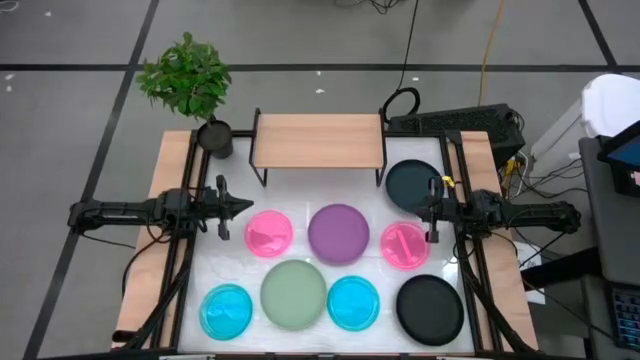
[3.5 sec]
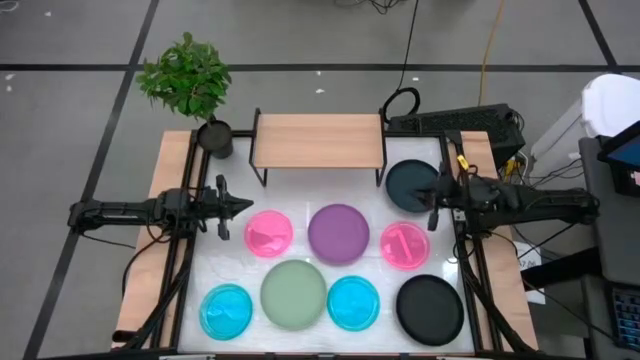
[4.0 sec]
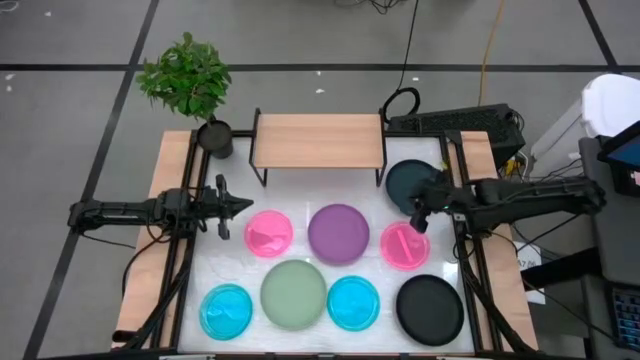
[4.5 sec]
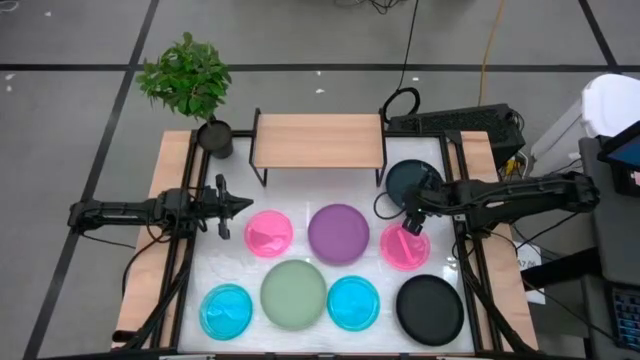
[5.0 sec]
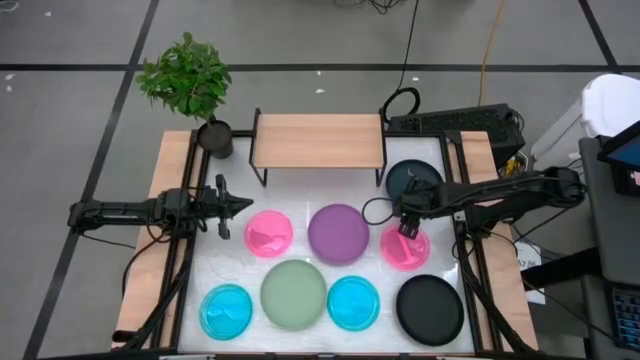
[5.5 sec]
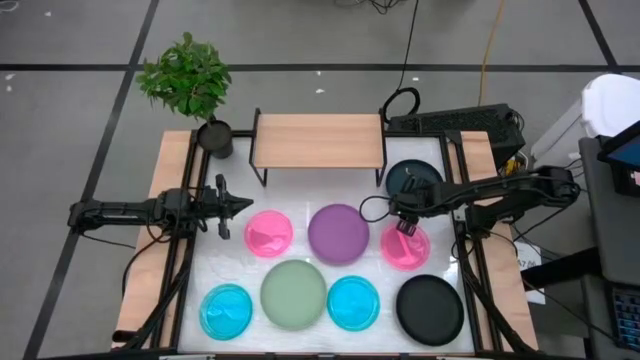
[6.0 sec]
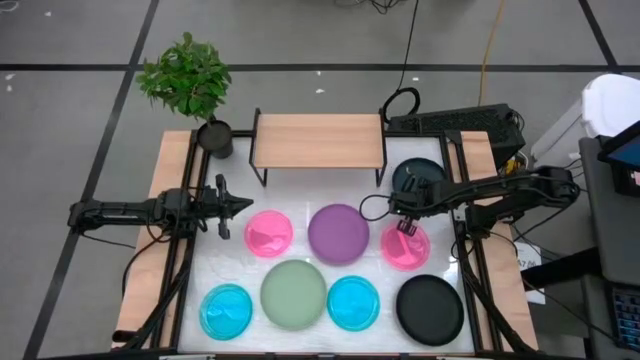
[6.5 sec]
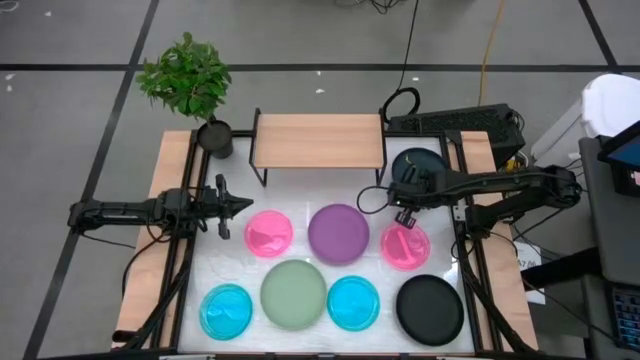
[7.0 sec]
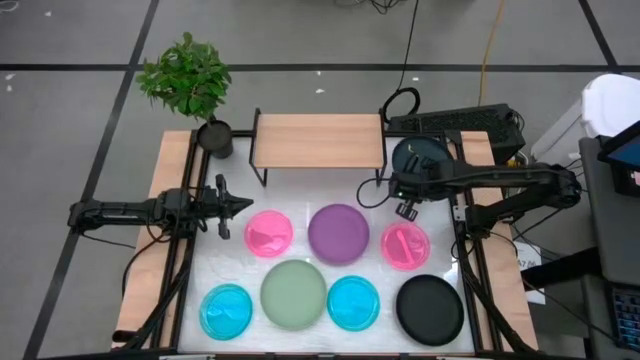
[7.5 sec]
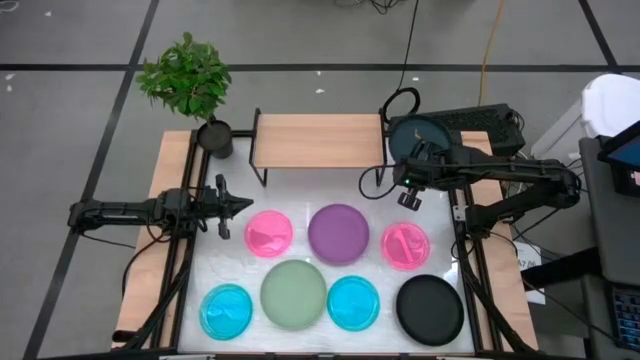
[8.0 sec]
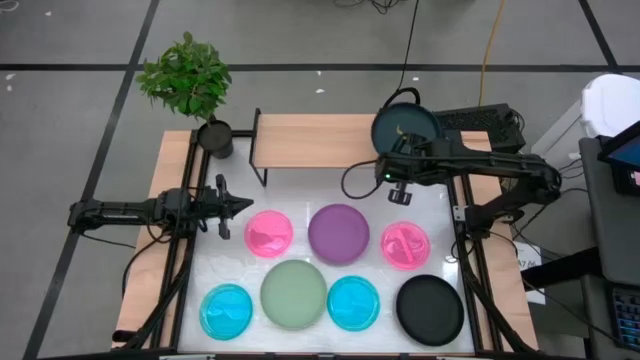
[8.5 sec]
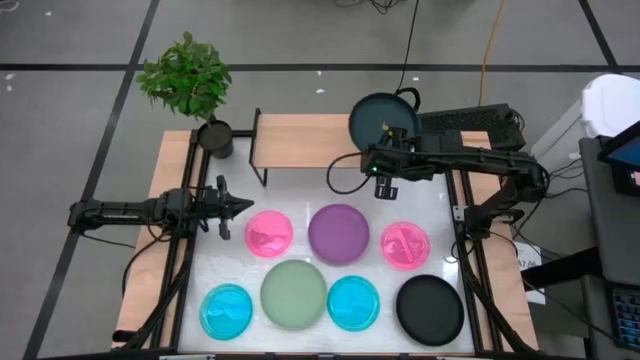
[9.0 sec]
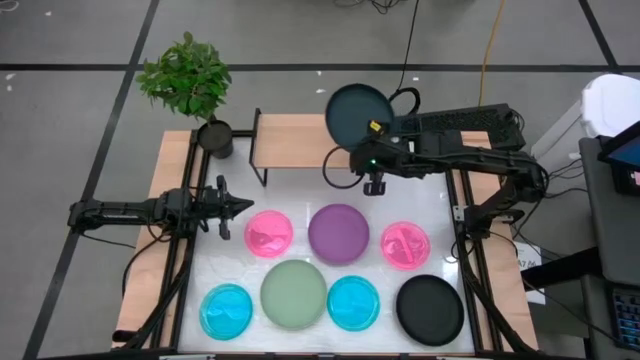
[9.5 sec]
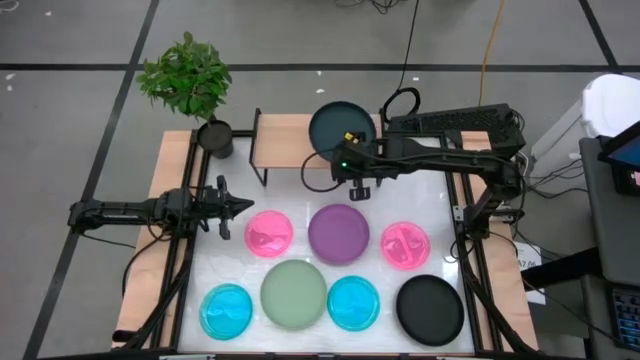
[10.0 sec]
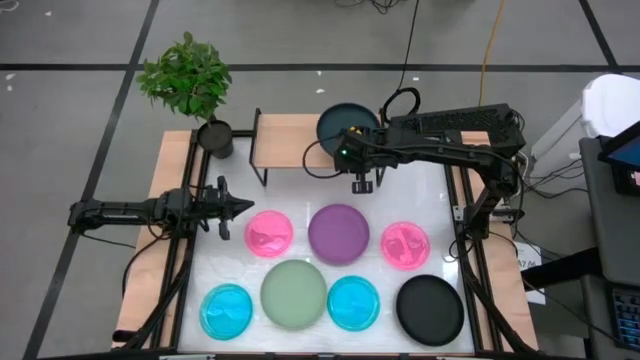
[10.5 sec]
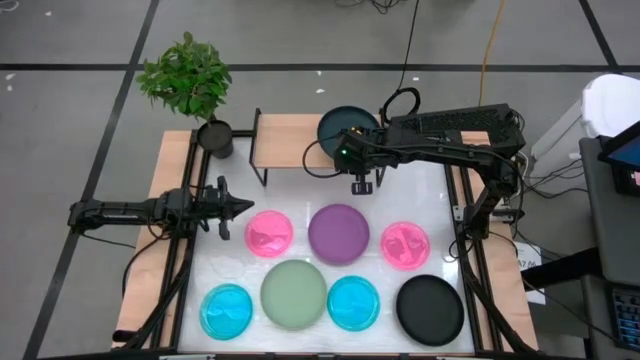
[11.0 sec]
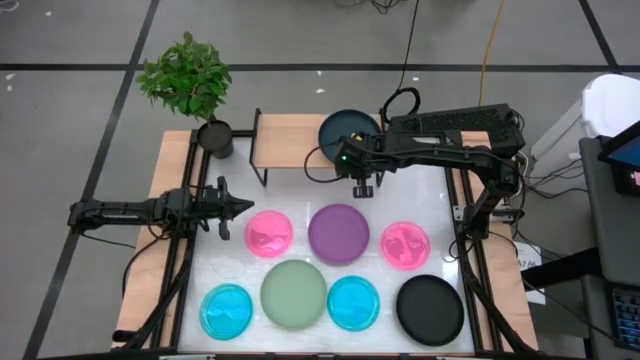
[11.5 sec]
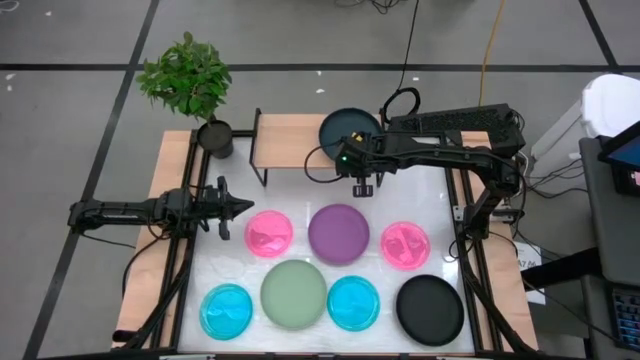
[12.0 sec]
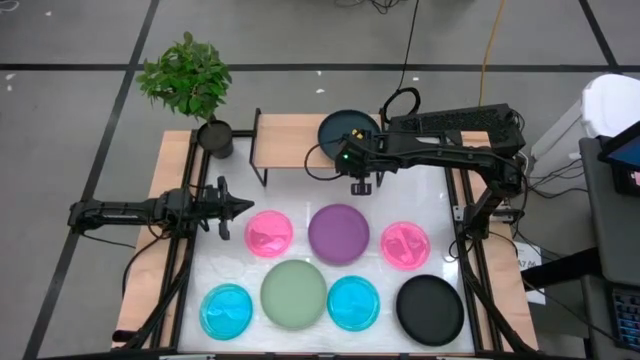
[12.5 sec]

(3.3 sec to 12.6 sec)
Task: Place and stack plates onto a shelf
Put the top black plate on the shelf

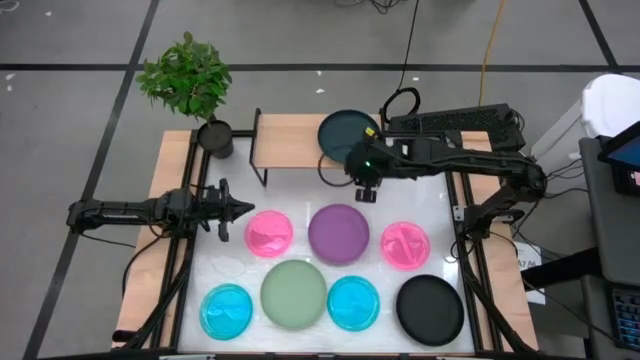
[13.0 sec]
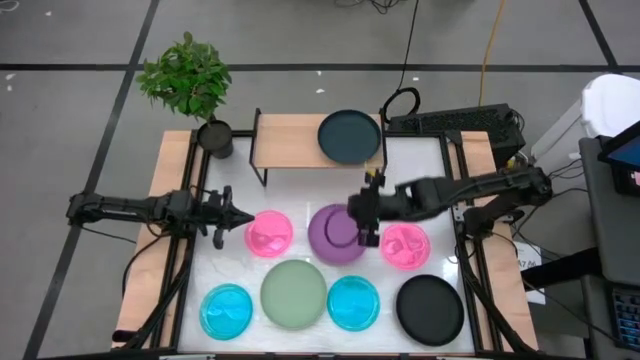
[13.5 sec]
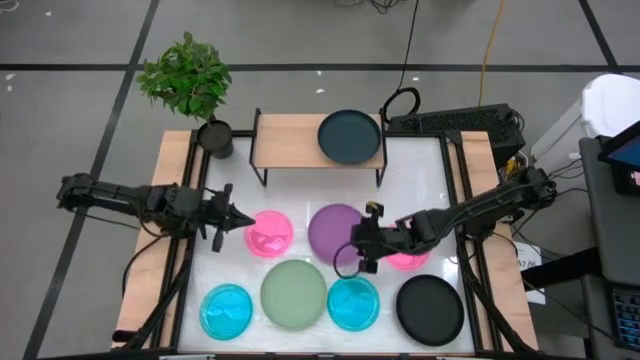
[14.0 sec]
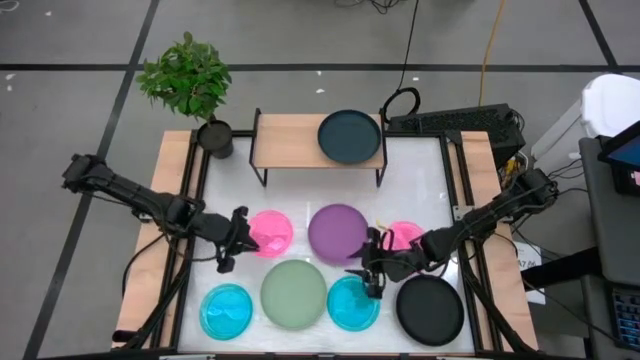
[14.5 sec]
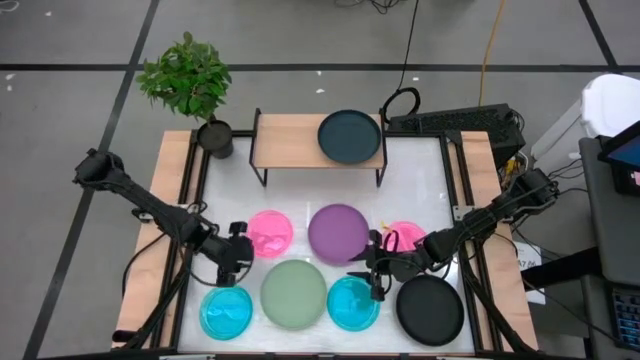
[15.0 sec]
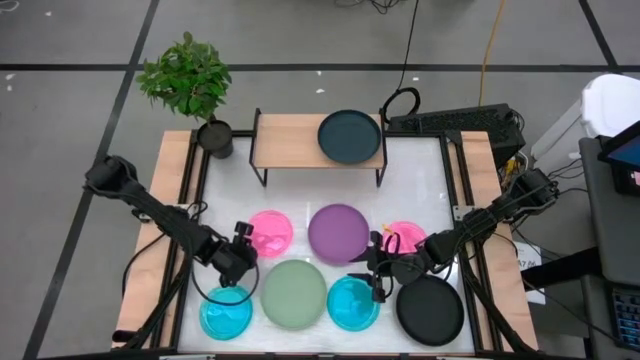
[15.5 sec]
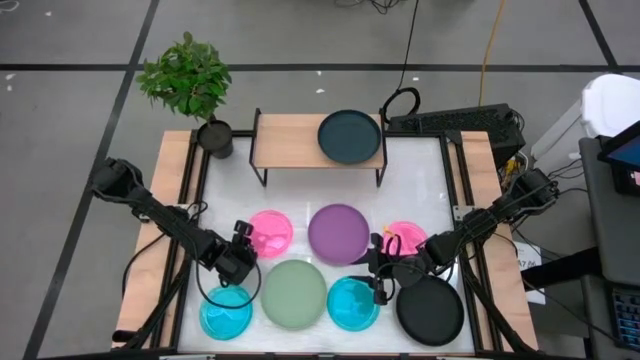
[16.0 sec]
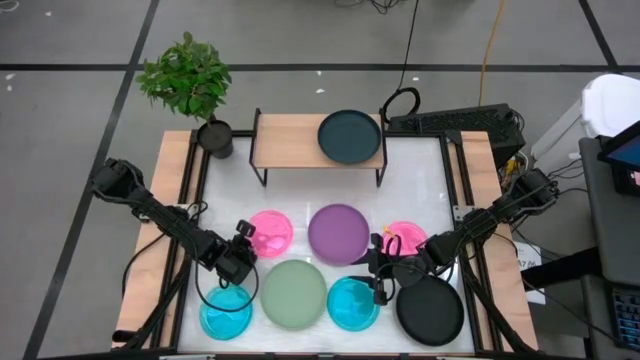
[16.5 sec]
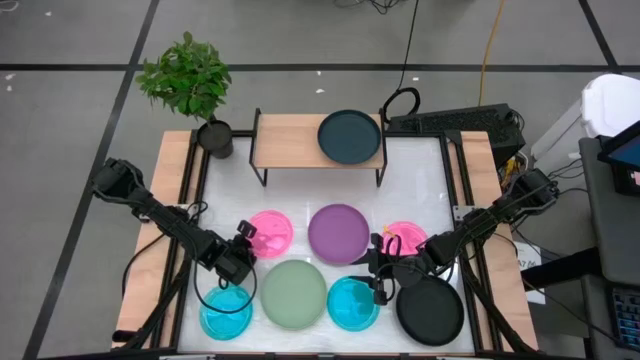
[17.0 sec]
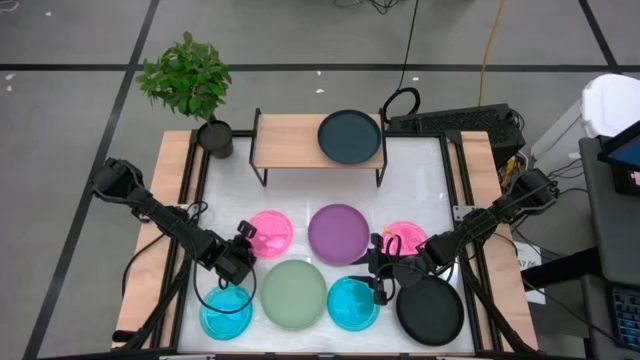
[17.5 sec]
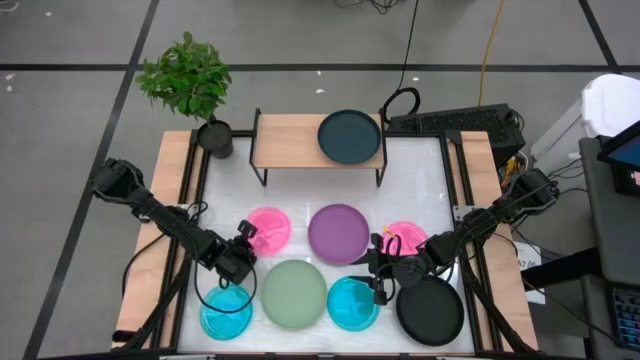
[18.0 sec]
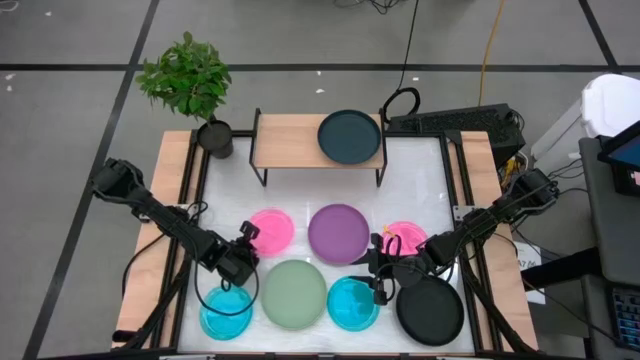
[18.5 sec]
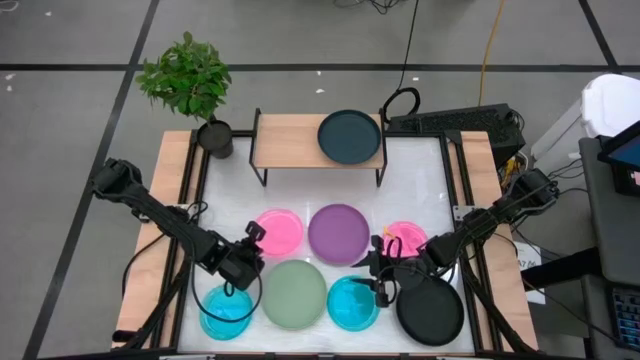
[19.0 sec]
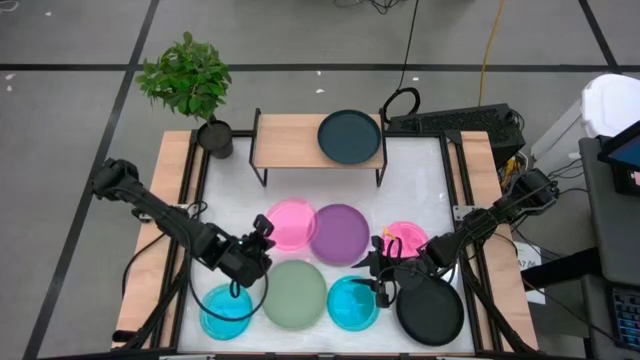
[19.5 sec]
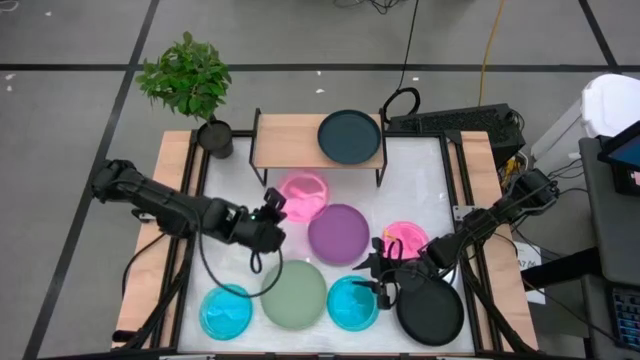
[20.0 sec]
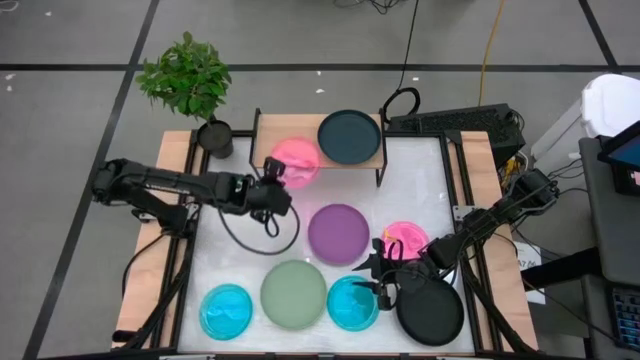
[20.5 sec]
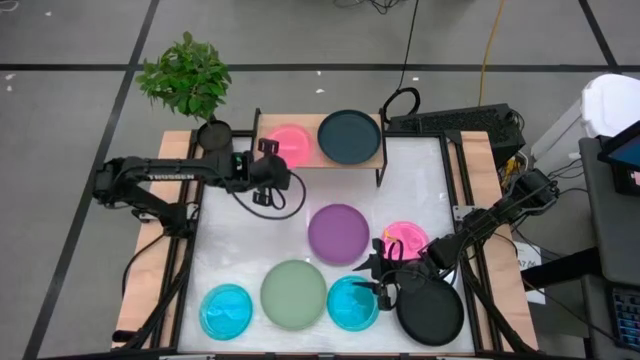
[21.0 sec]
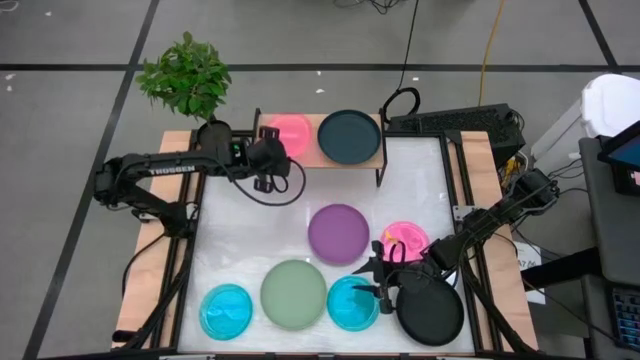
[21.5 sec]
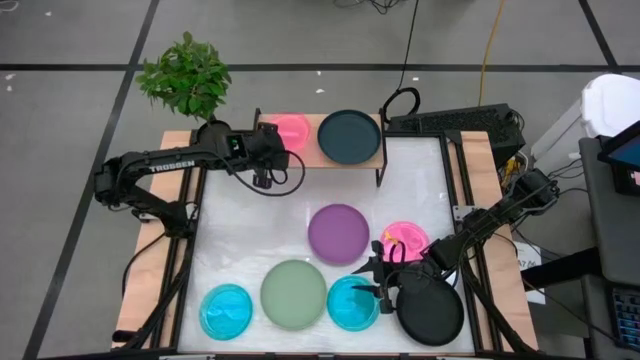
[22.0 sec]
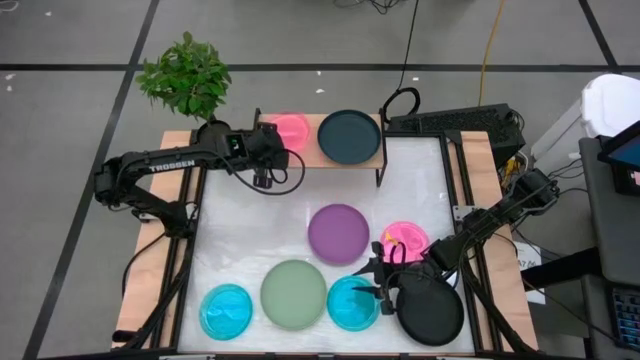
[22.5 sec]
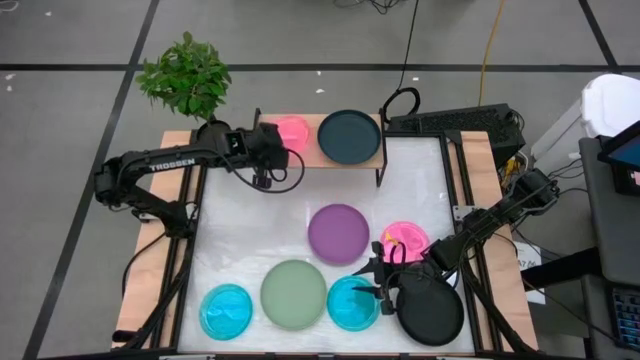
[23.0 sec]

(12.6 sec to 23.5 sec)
Put the left pink plate on the shelf
